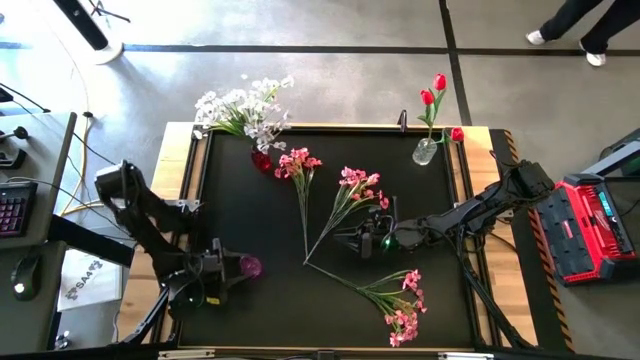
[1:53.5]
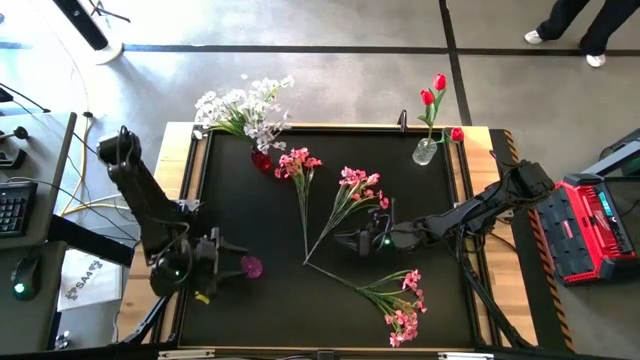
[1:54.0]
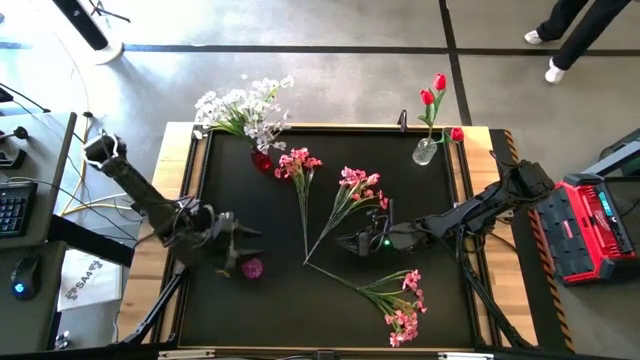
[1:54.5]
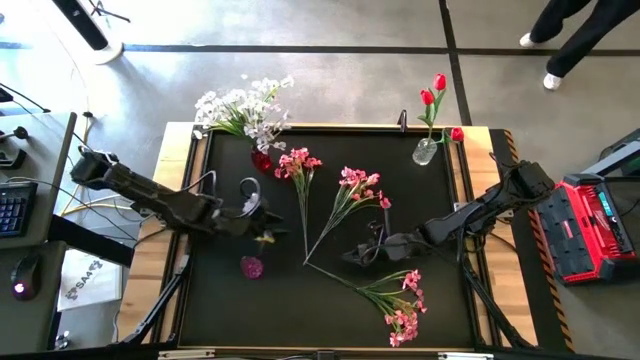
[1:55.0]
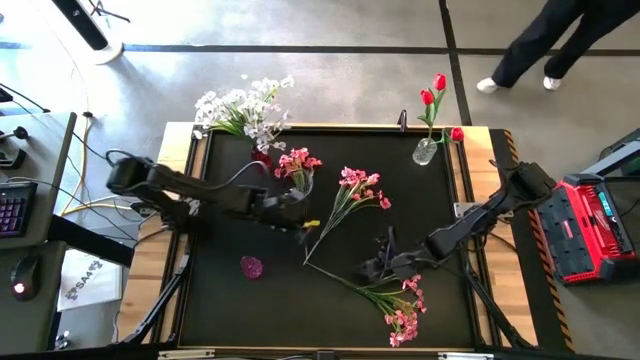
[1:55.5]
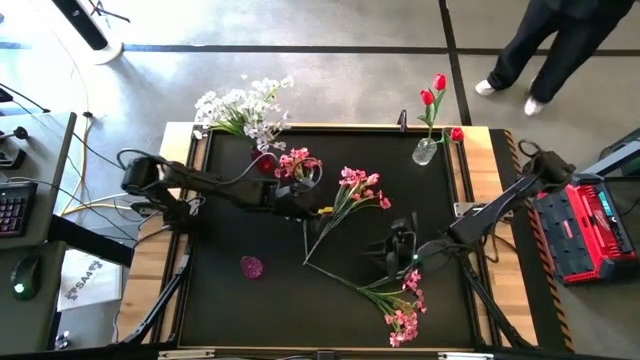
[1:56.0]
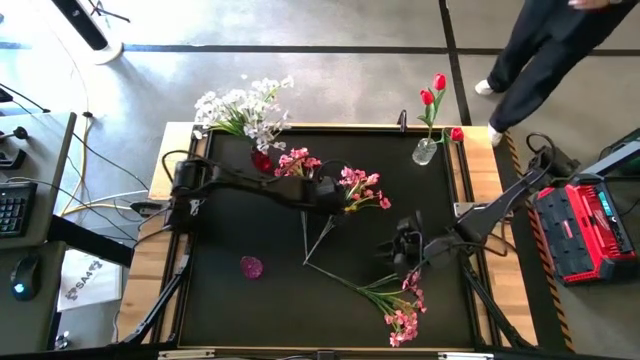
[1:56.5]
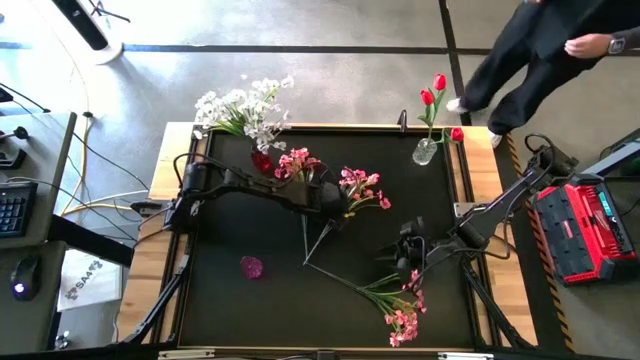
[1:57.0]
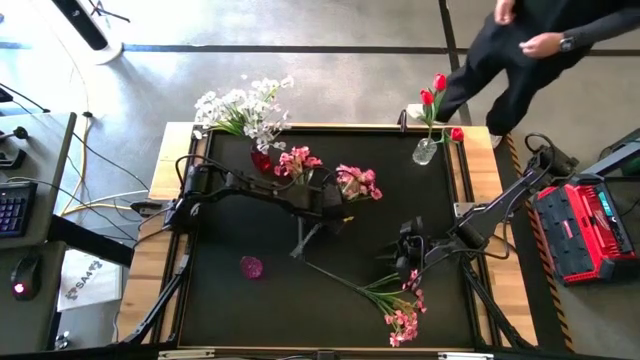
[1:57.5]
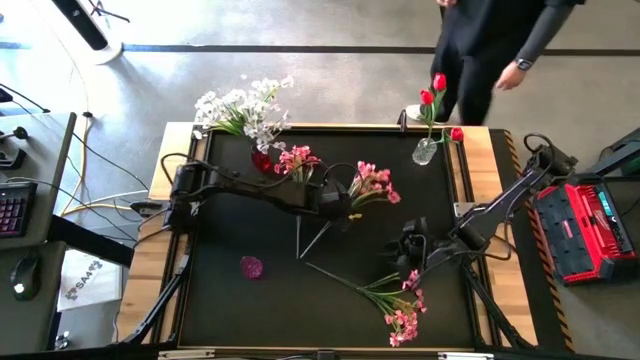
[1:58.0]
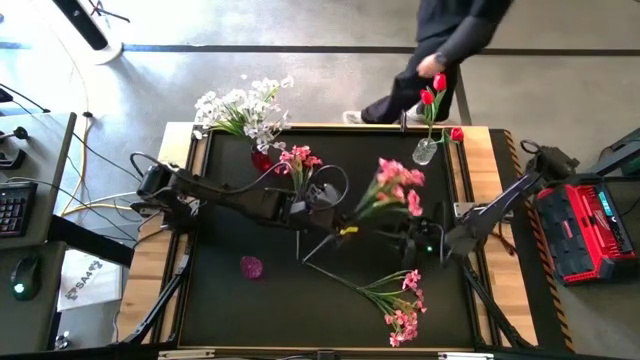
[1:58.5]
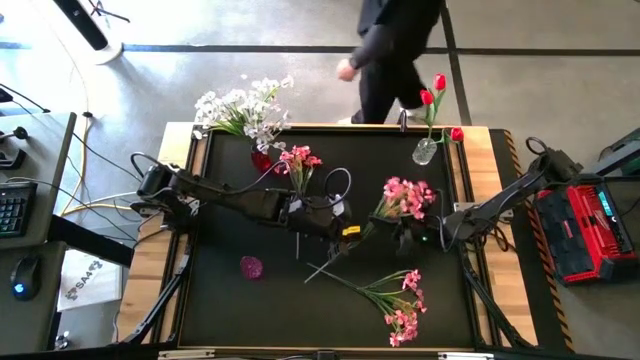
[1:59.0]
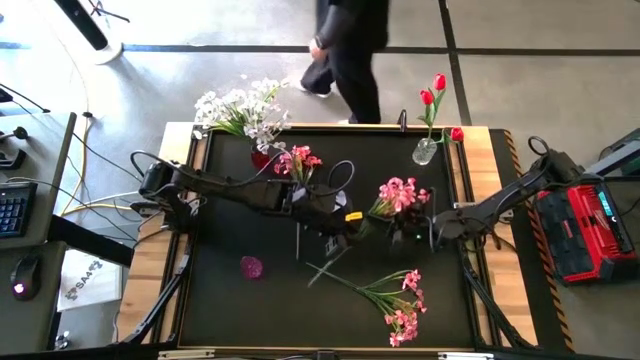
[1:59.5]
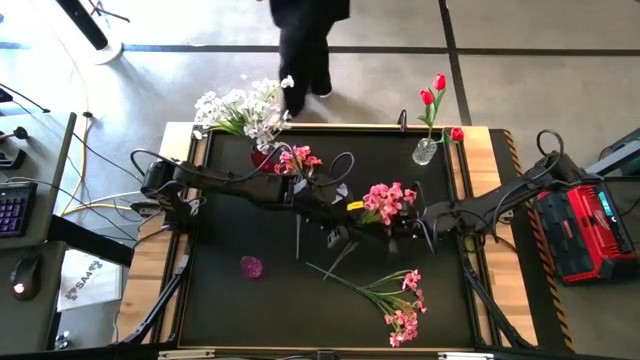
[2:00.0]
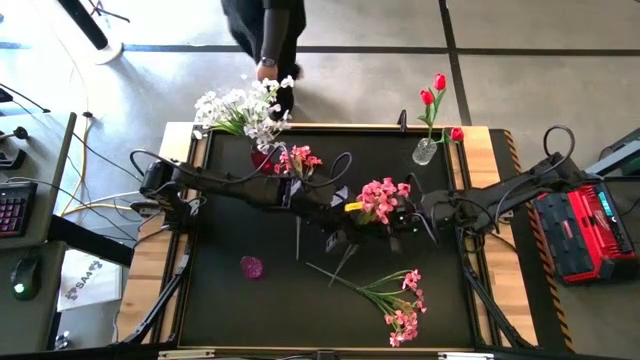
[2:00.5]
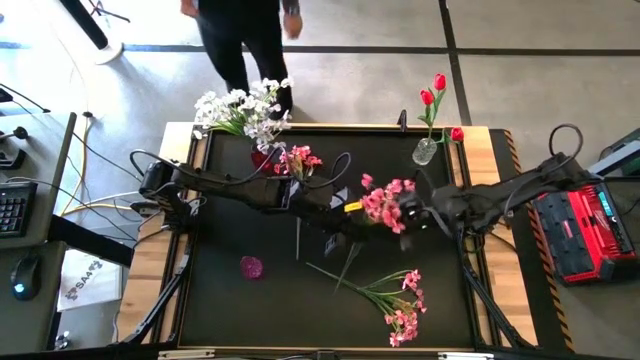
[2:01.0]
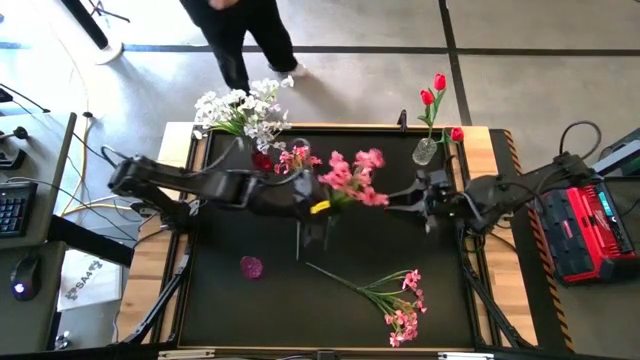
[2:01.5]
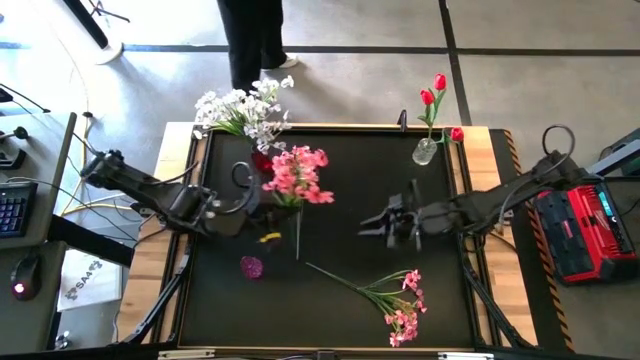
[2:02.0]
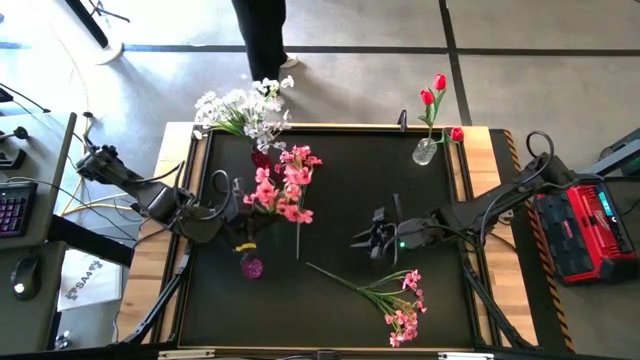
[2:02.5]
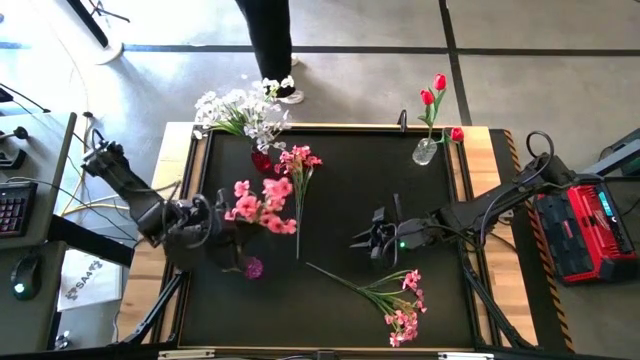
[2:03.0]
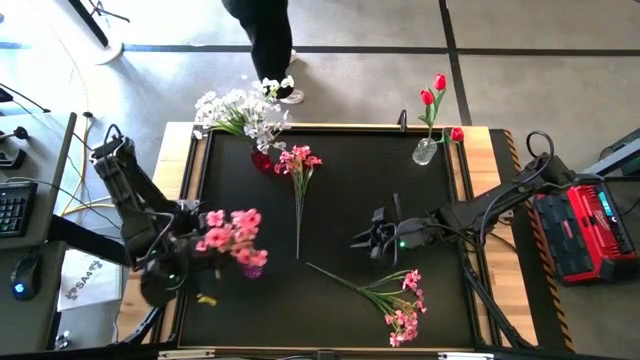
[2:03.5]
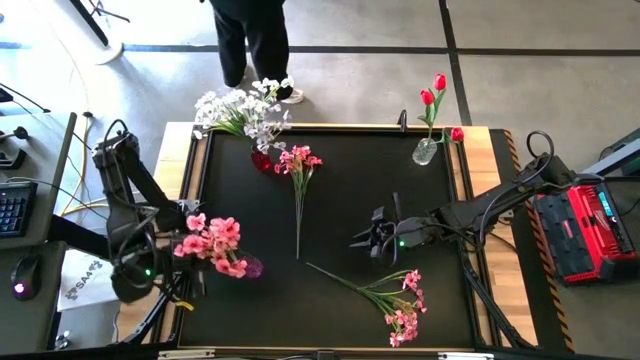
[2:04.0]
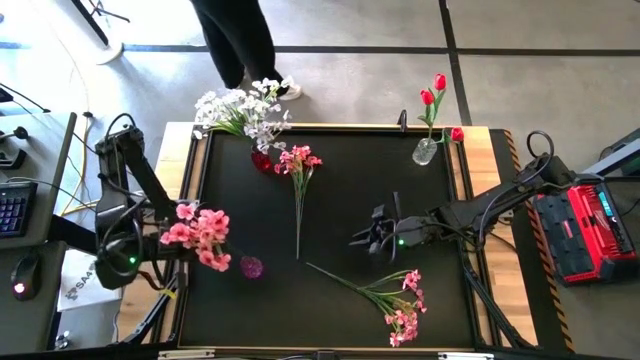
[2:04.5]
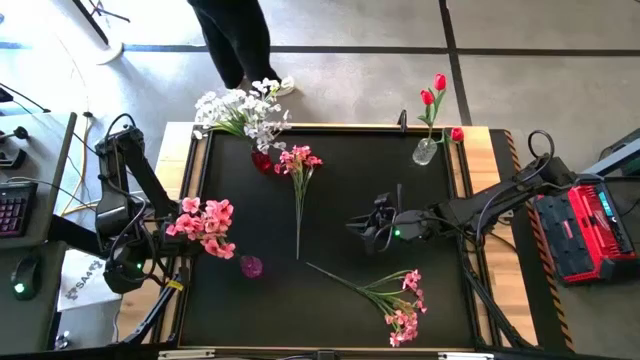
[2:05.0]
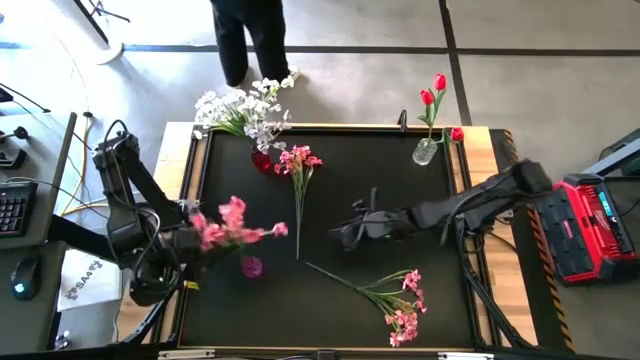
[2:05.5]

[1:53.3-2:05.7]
Task: Sort flowers into vase by color
Put the middle pink flowers into the violet vase

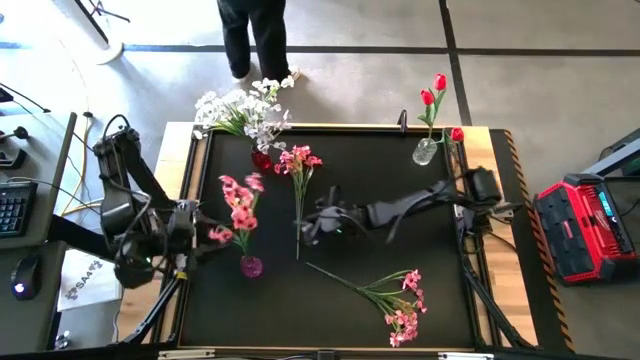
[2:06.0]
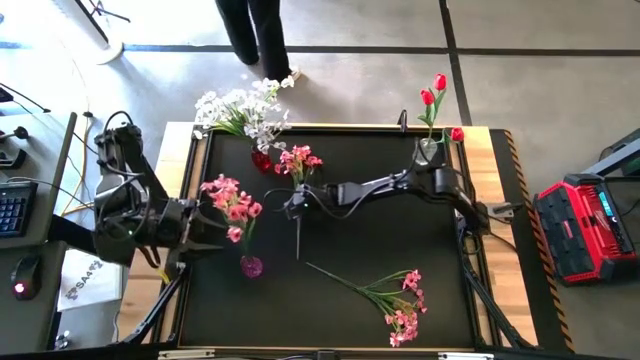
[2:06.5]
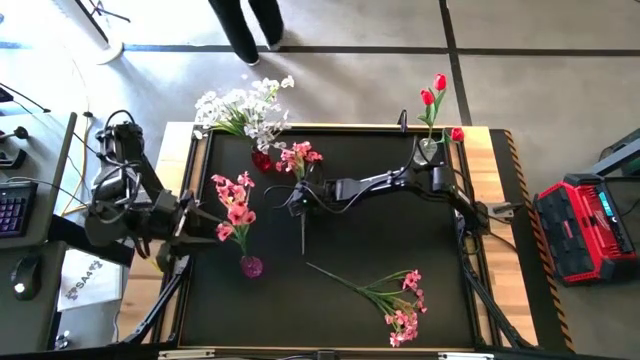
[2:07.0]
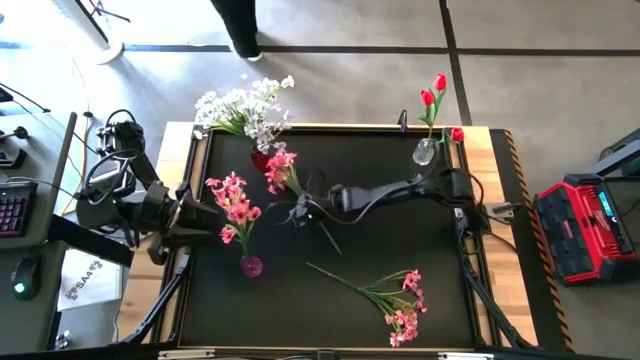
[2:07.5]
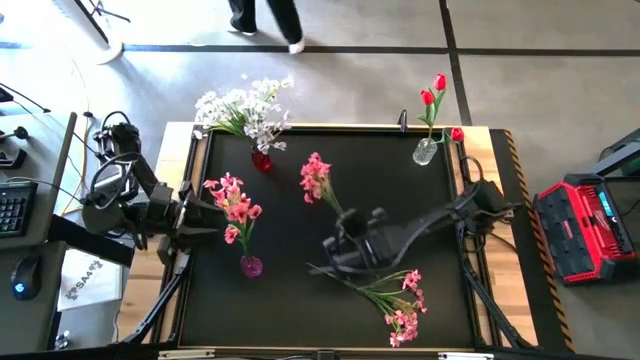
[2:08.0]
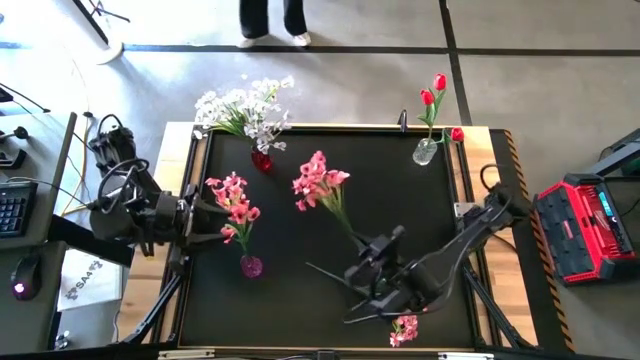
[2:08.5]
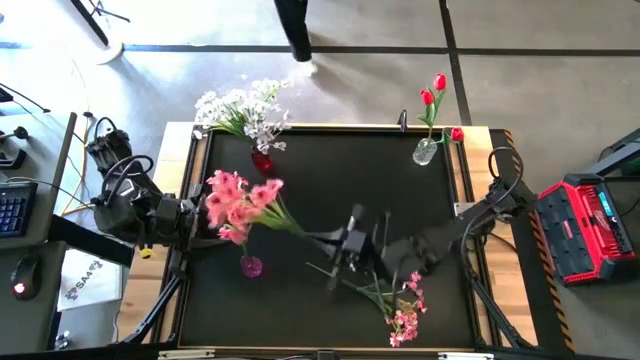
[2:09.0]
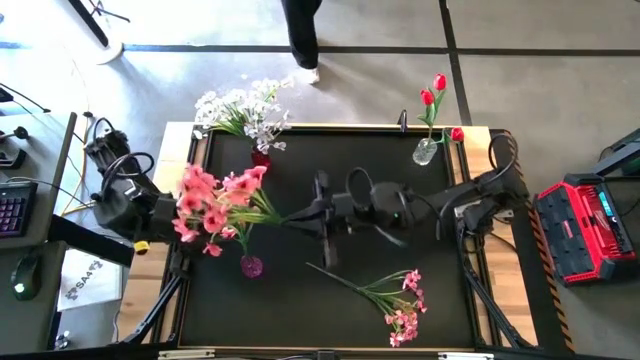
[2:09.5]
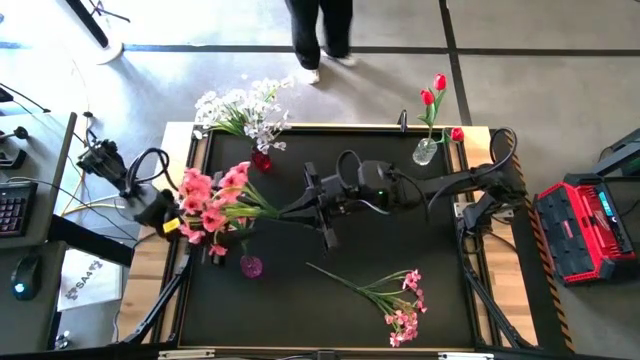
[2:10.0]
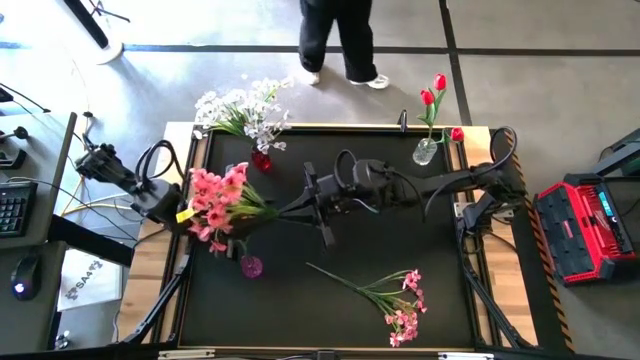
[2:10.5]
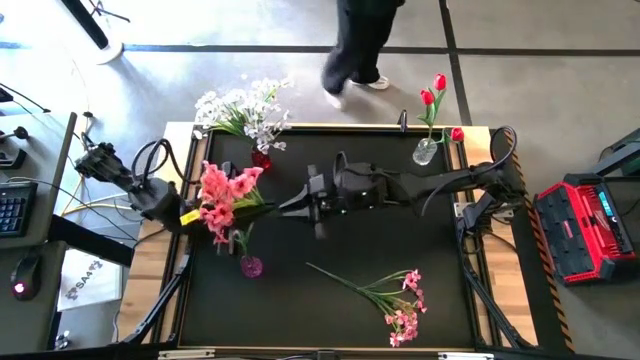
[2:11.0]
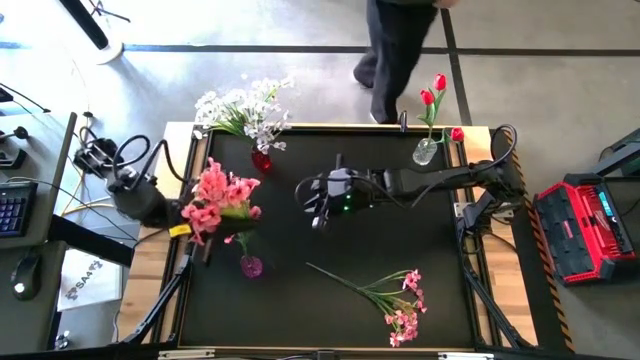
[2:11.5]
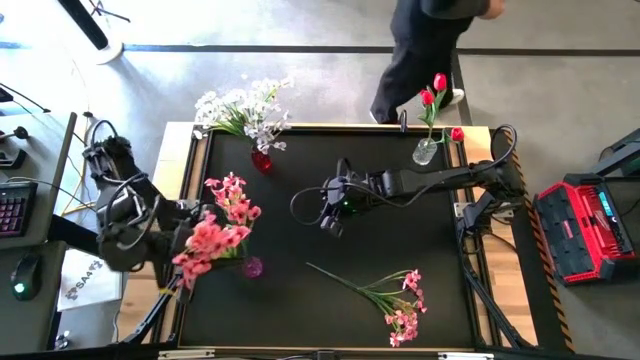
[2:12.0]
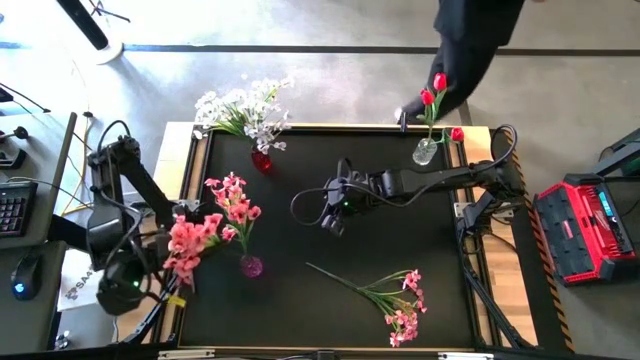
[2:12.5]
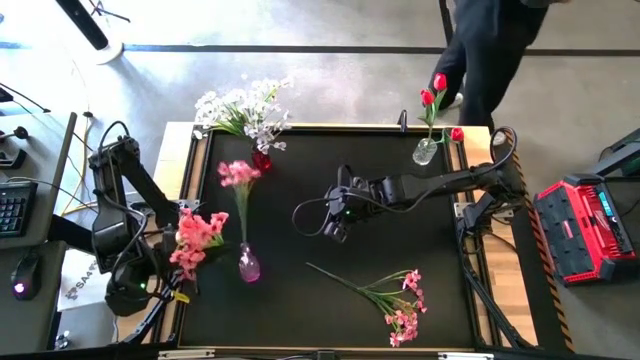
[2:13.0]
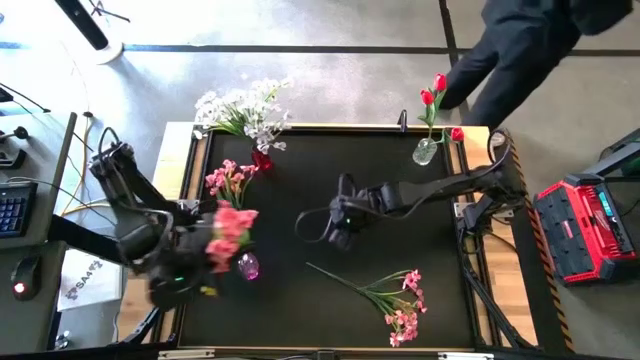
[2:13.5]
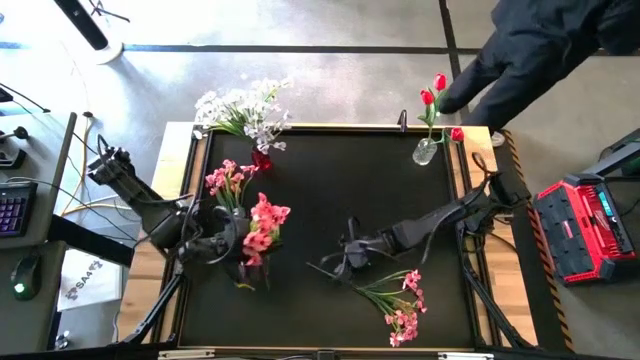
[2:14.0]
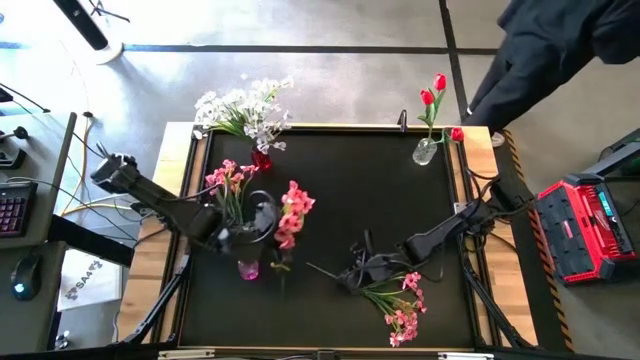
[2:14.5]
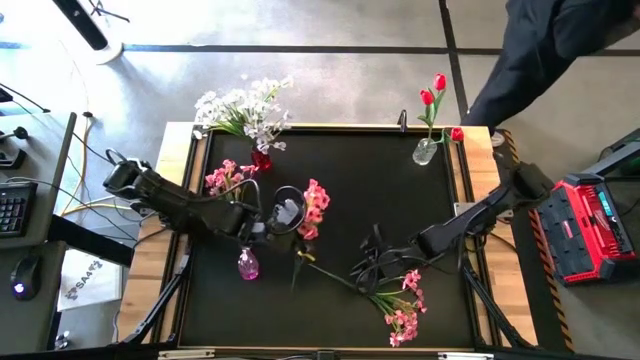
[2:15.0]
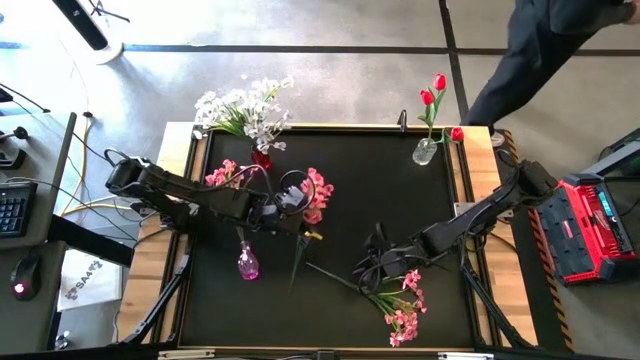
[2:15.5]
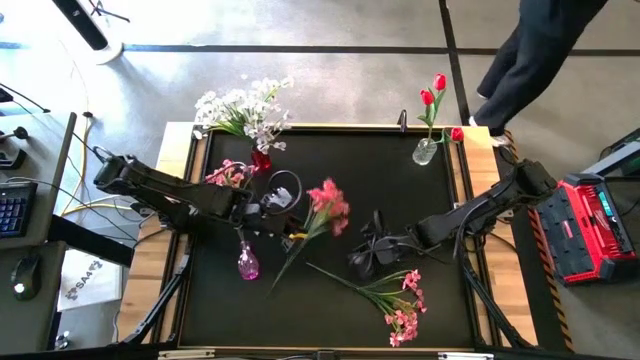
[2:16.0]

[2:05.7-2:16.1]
Put the top pink flowers into the purple vase
